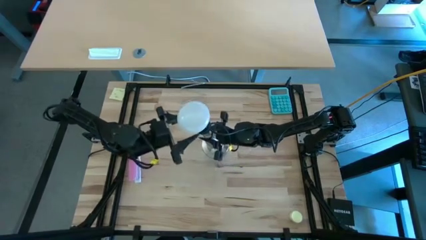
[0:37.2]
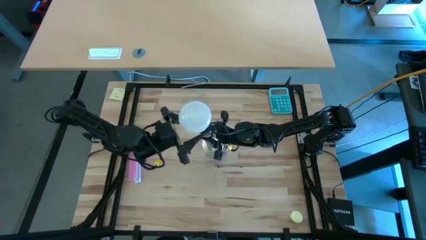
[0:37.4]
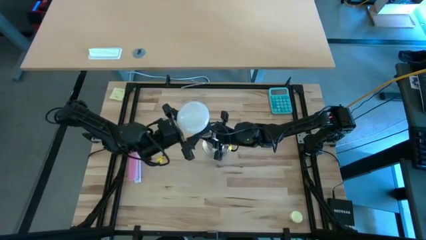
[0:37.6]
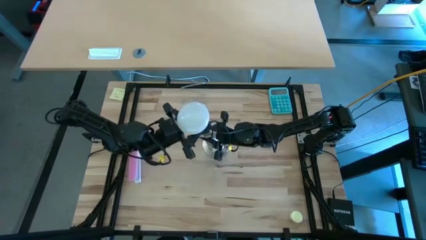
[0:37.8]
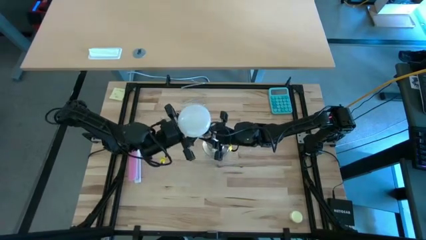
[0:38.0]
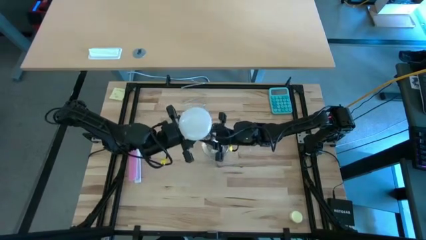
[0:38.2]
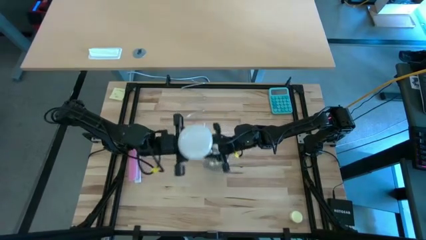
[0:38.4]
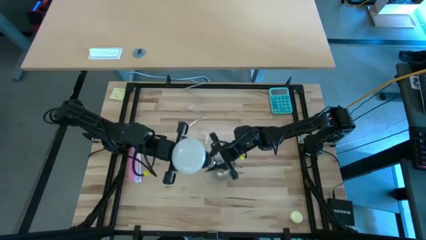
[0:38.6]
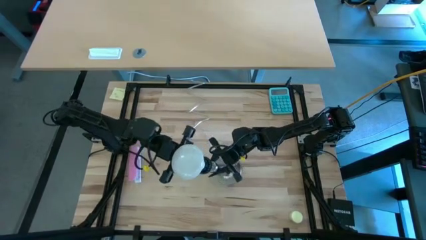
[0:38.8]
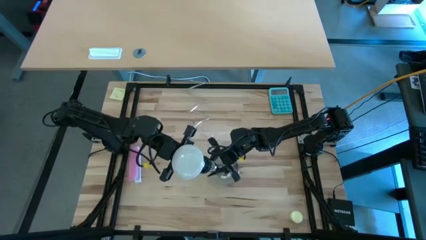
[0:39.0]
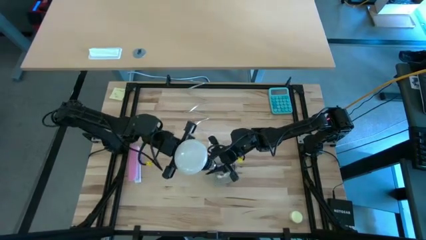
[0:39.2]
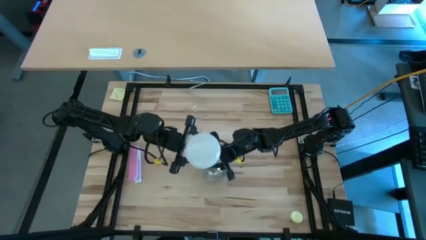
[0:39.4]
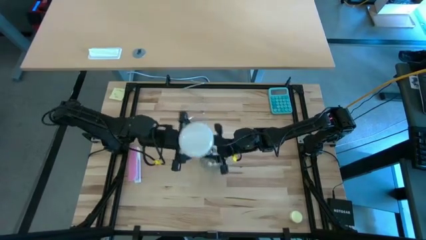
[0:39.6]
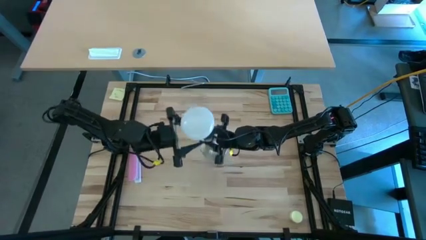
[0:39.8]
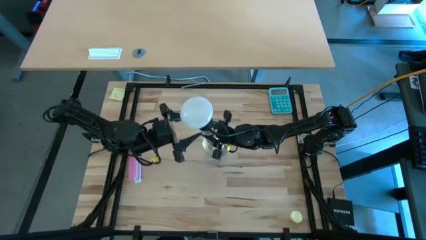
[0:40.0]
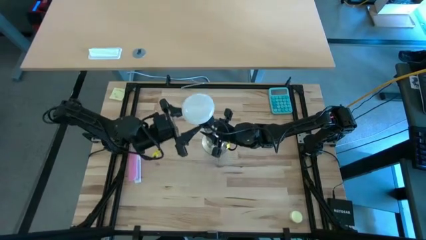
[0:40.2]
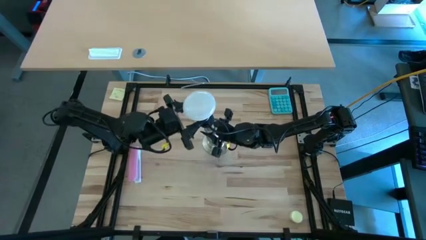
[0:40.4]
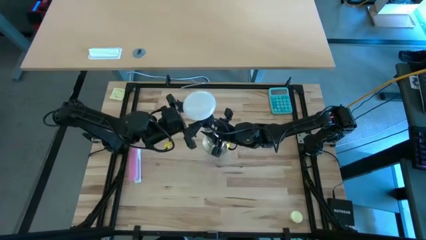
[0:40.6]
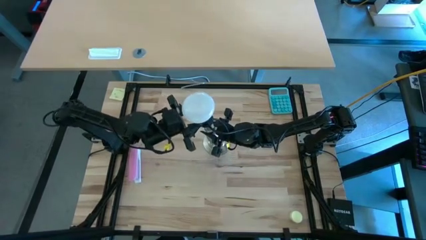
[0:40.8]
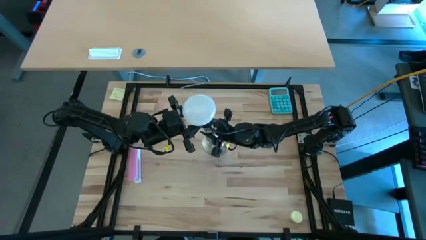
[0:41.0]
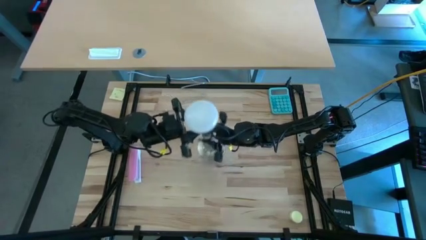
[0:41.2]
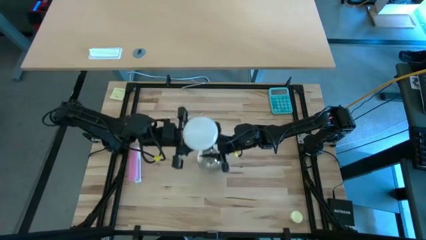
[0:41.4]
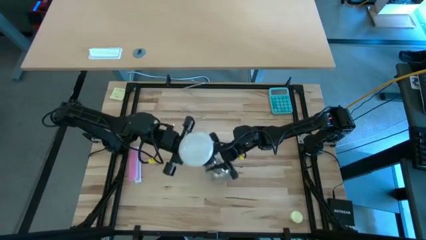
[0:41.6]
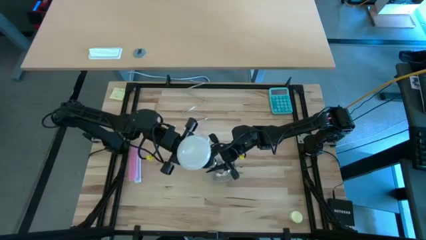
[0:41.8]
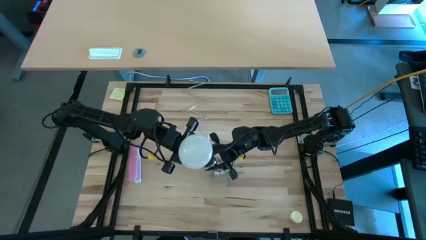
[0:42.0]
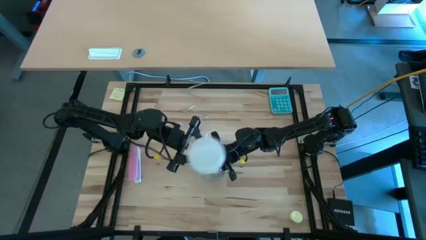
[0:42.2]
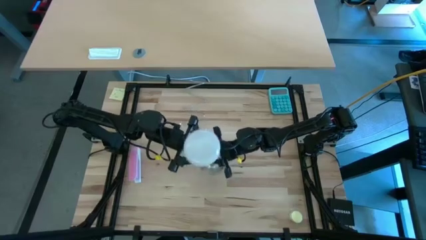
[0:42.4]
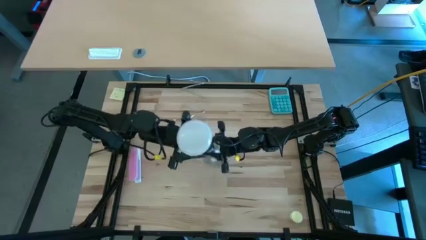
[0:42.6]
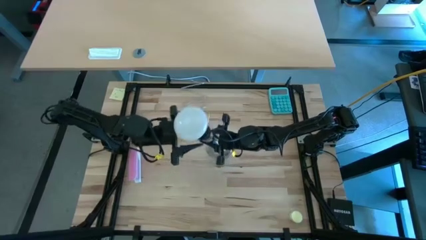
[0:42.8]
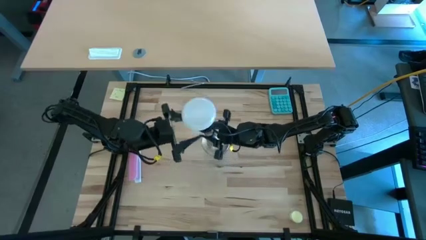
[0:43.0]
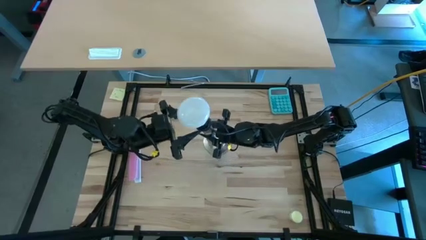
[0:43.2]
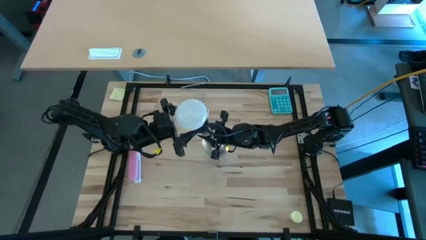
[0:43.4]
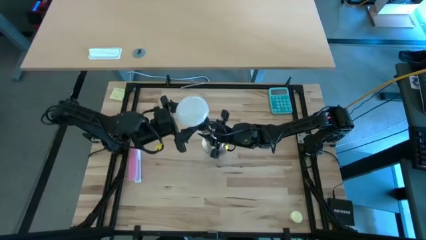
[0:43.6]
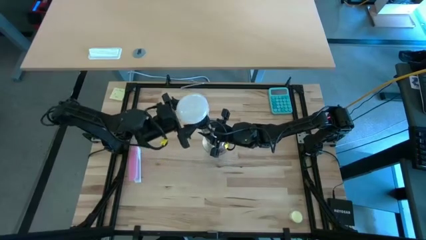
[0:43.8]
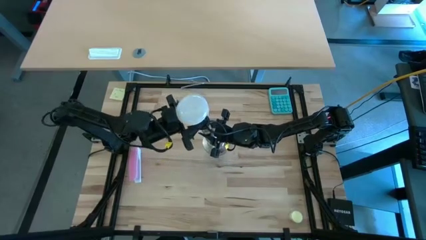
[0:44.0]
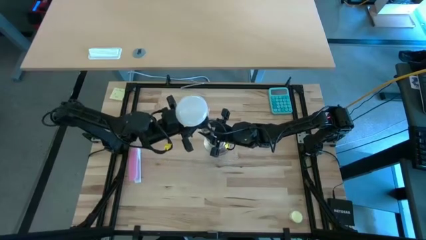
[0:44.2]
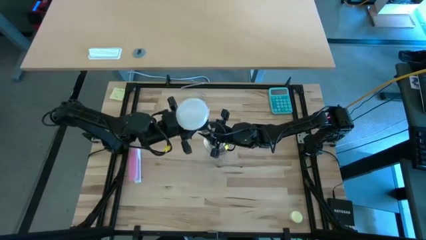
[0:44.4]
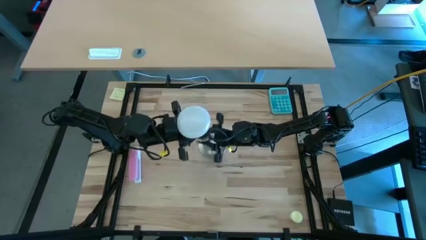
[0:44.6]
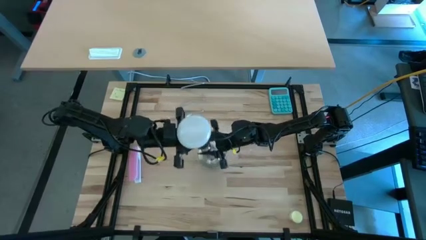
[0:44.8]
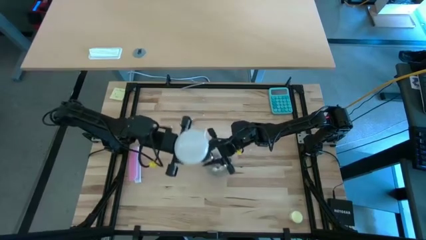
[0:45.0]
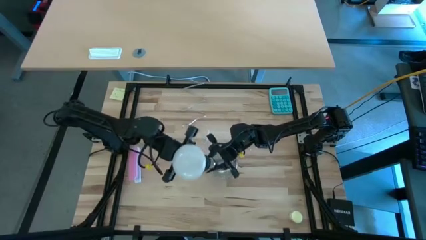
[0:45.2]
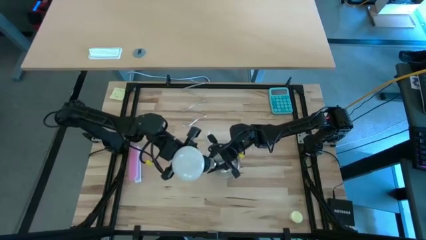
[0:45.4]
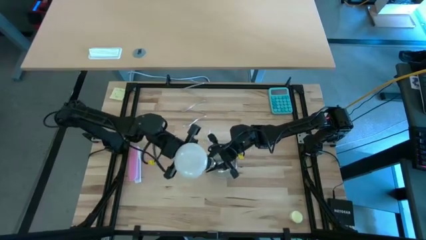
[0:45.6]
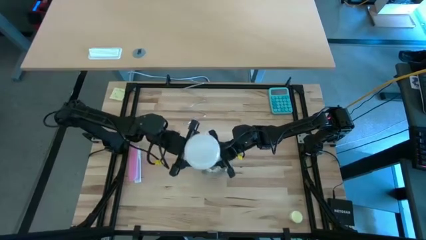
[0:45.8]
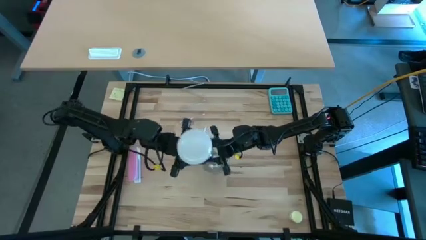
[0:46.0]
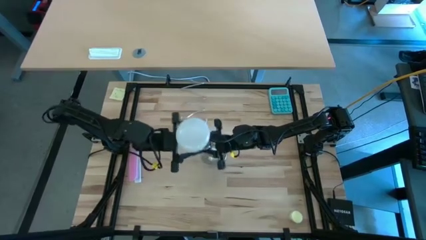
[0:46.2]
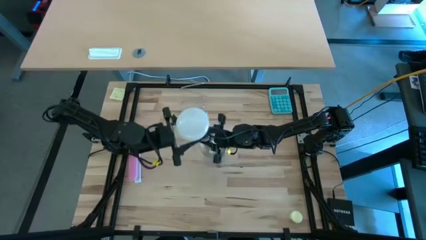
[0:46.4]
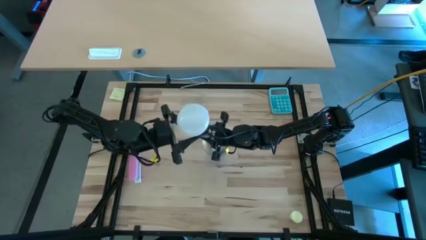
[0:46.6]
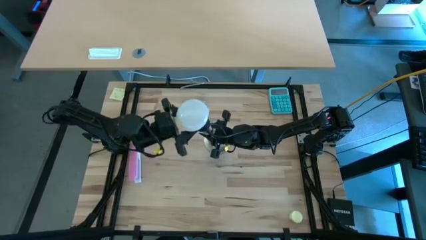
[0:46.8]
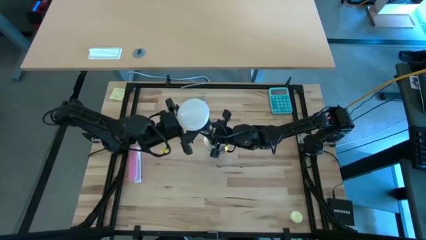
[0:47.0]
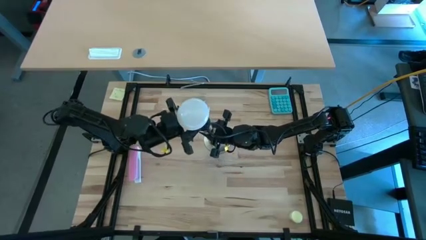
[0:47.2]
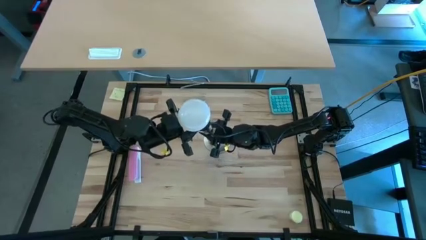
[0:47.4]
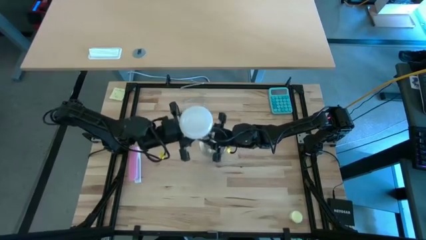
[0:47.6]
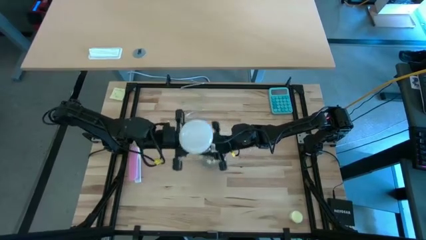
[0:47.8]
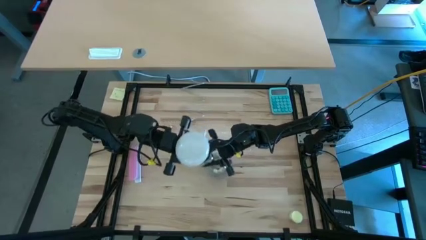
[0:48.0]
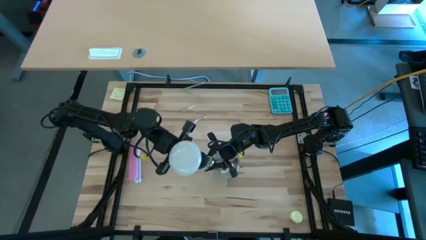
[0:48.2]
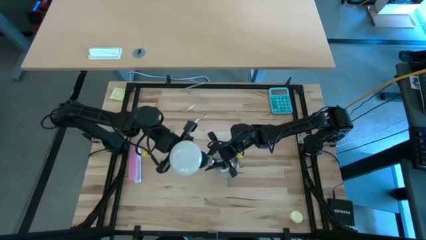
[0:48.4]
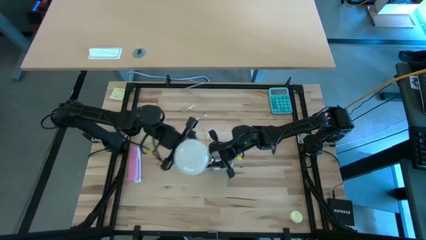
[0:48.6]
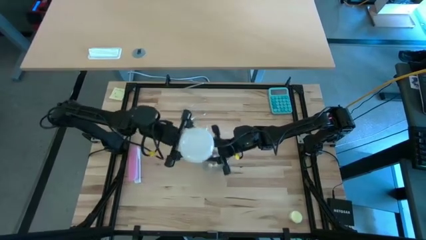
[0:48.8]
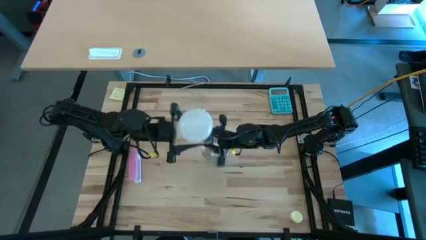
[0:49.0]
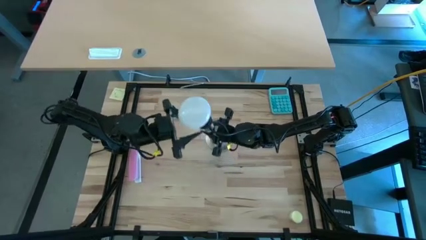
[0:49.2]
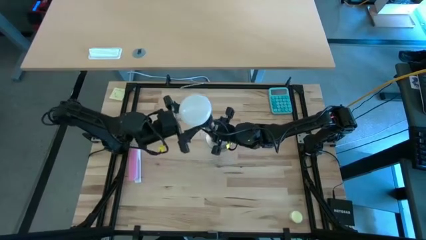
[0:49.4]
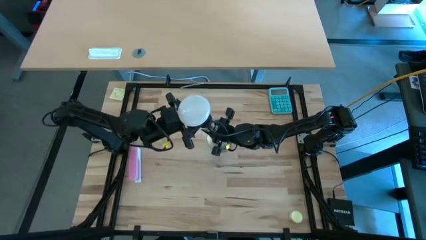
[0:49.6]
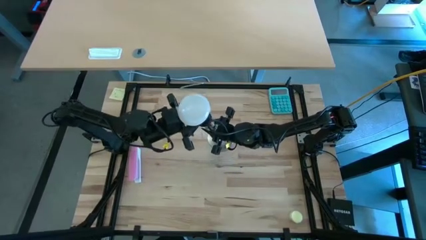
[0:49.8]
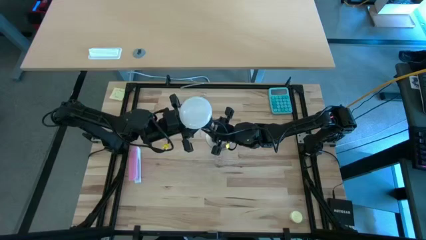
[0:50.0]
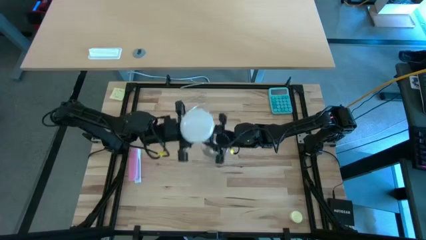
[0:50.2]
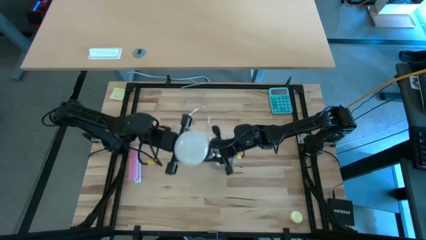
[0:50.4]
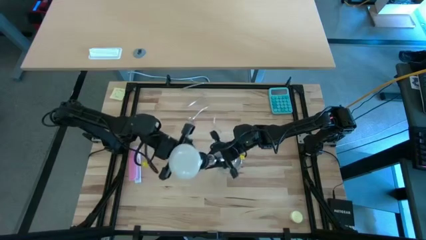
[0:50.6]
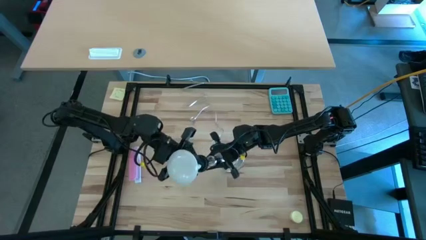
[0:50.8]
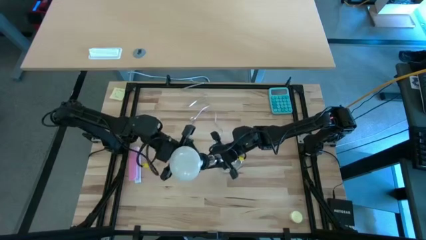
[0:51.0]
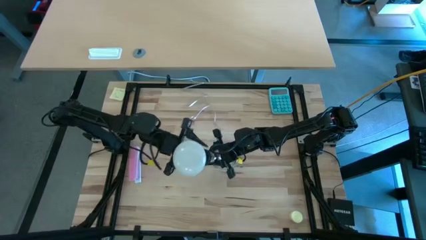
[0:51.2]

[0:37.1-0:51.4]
Task: Screw lightbulb
Insert the white lightbulb on the silver lamp
